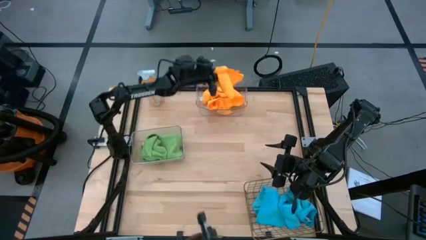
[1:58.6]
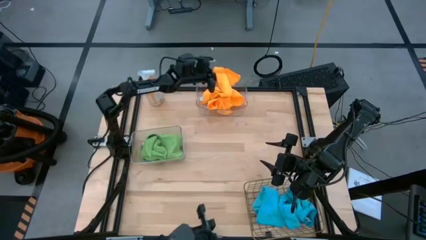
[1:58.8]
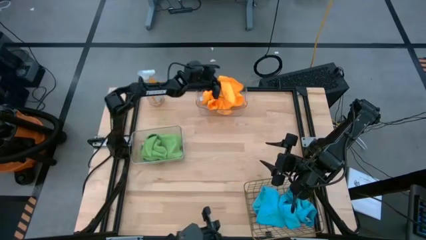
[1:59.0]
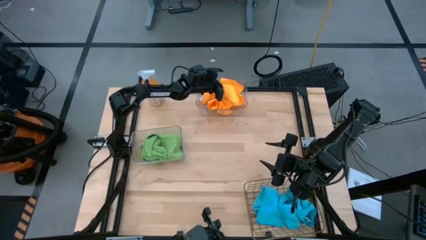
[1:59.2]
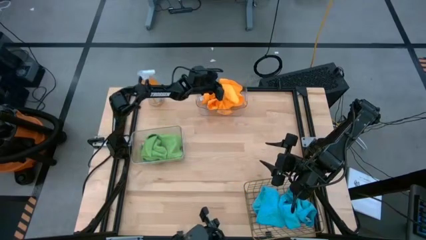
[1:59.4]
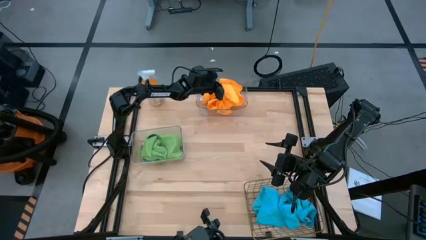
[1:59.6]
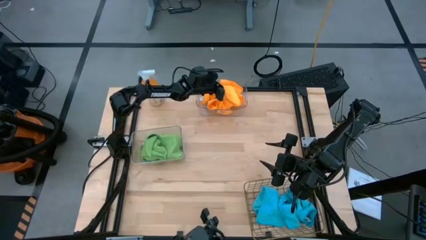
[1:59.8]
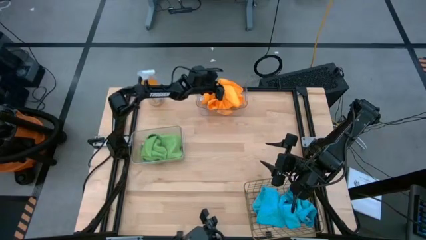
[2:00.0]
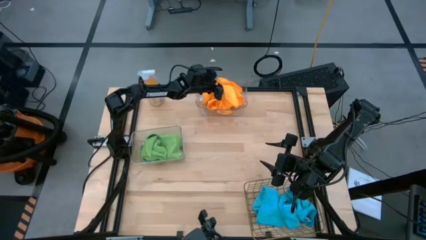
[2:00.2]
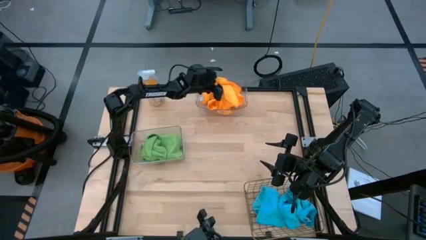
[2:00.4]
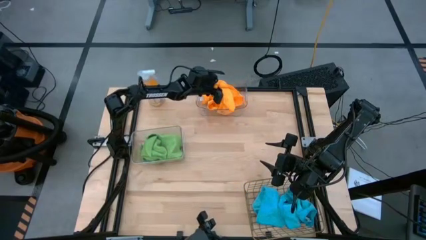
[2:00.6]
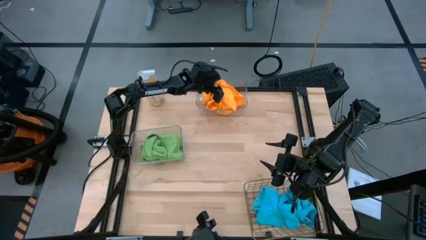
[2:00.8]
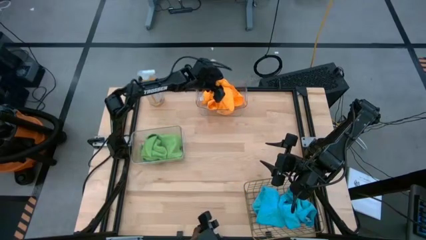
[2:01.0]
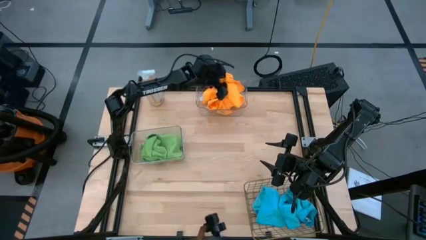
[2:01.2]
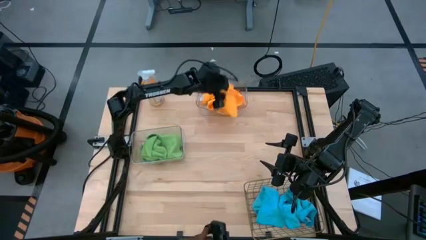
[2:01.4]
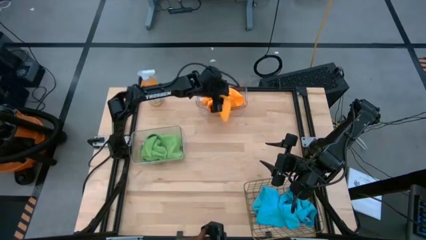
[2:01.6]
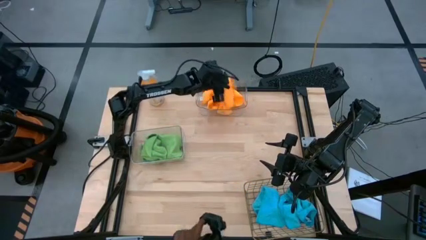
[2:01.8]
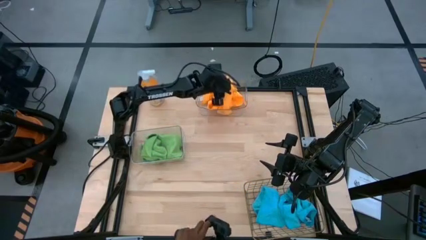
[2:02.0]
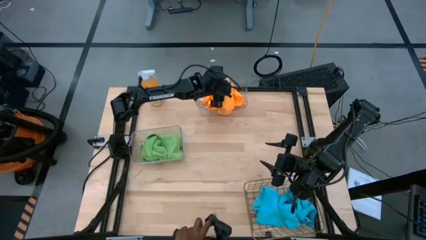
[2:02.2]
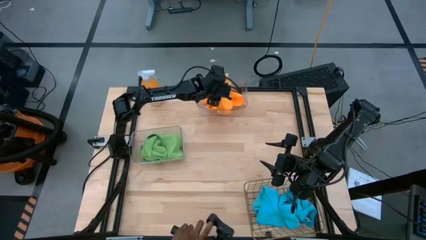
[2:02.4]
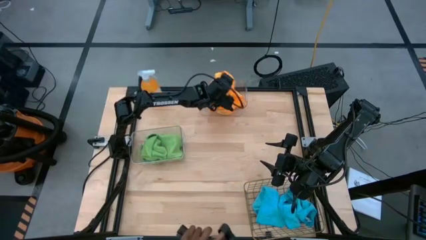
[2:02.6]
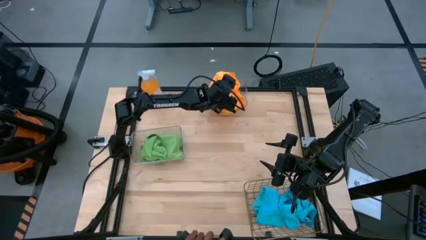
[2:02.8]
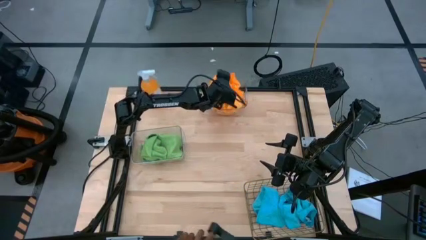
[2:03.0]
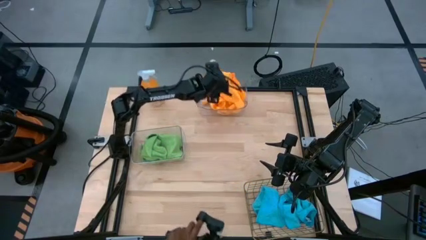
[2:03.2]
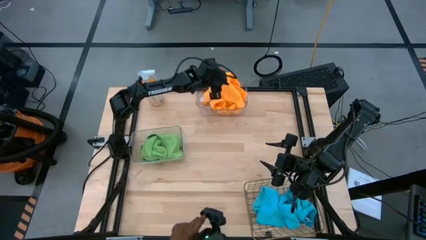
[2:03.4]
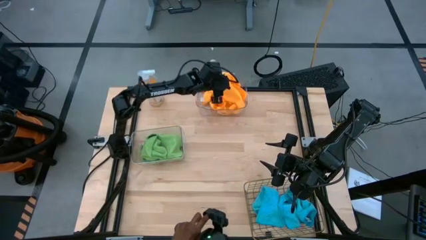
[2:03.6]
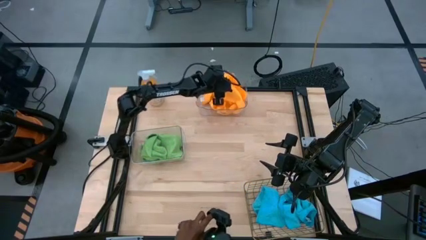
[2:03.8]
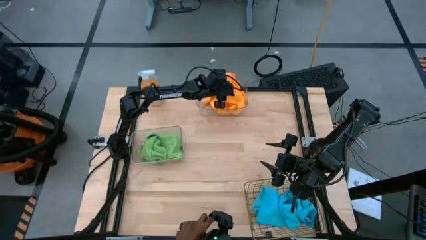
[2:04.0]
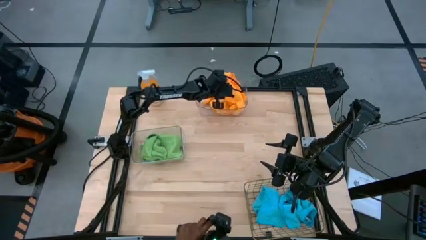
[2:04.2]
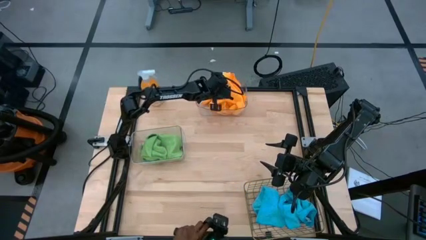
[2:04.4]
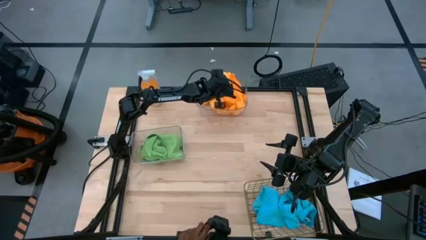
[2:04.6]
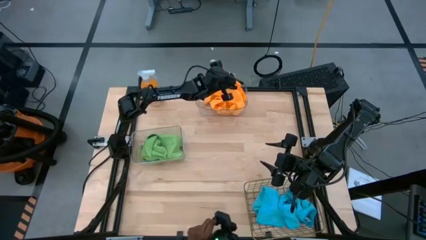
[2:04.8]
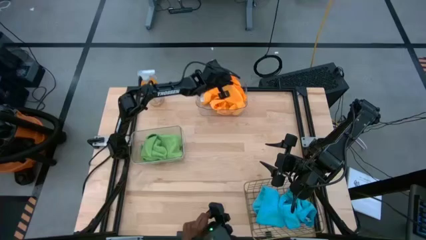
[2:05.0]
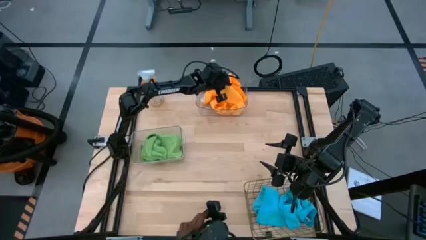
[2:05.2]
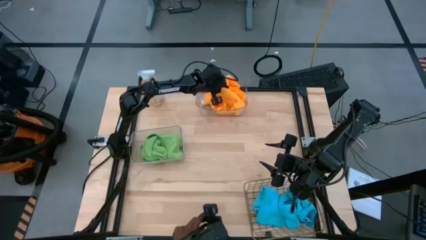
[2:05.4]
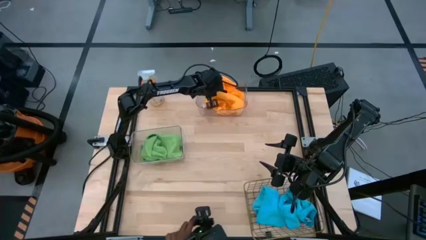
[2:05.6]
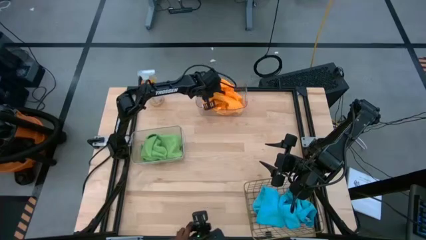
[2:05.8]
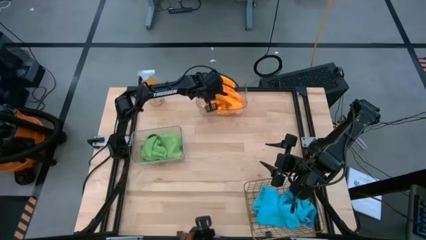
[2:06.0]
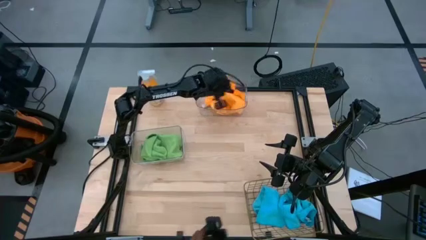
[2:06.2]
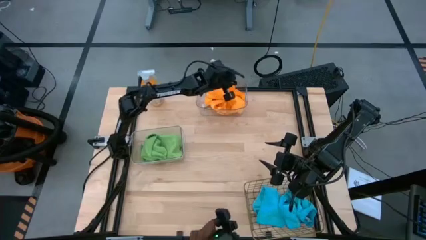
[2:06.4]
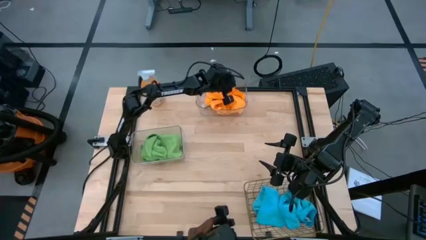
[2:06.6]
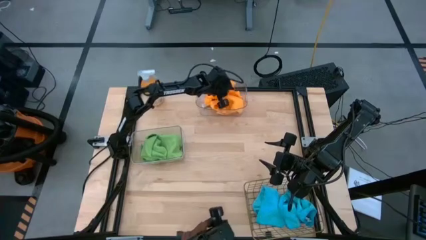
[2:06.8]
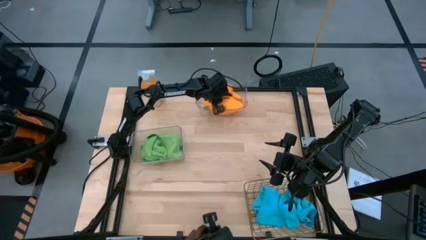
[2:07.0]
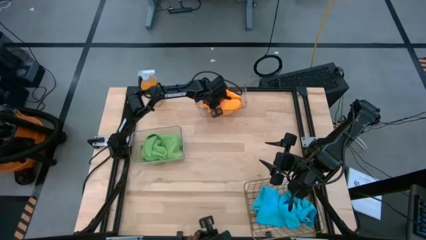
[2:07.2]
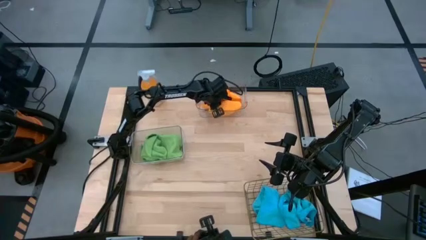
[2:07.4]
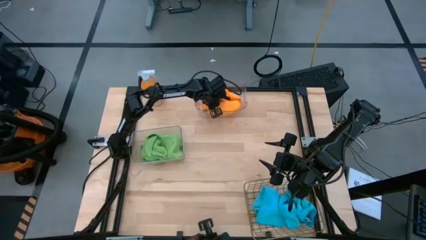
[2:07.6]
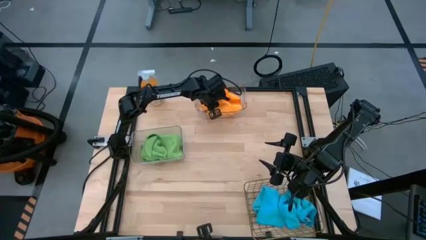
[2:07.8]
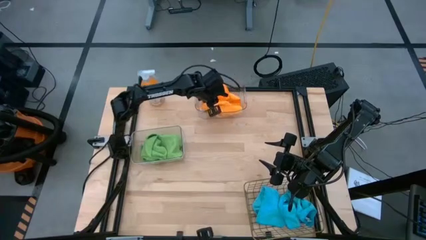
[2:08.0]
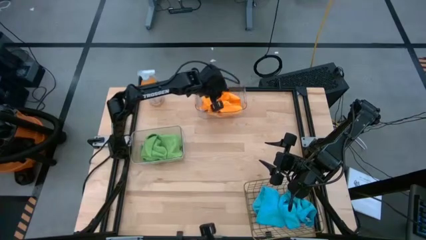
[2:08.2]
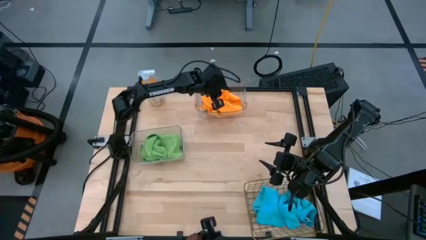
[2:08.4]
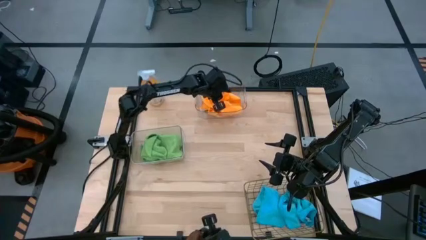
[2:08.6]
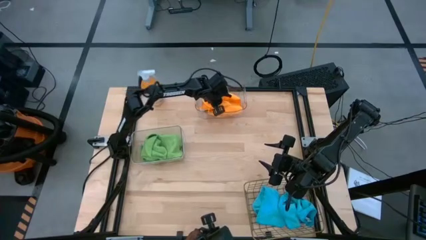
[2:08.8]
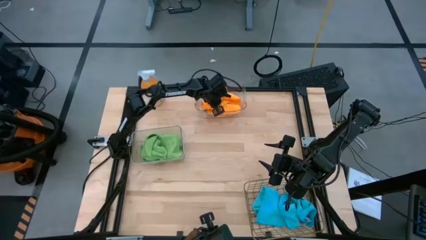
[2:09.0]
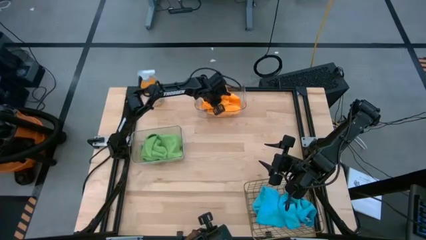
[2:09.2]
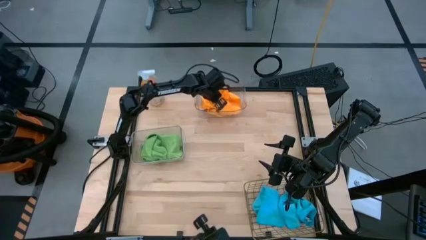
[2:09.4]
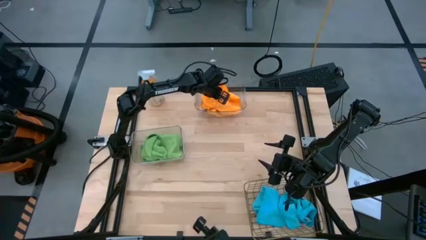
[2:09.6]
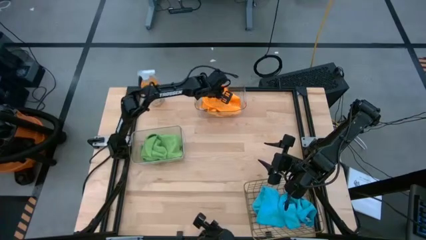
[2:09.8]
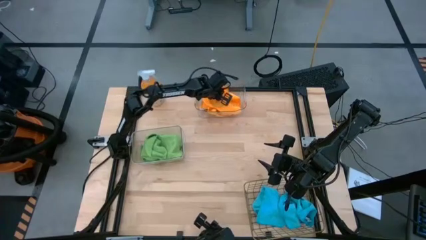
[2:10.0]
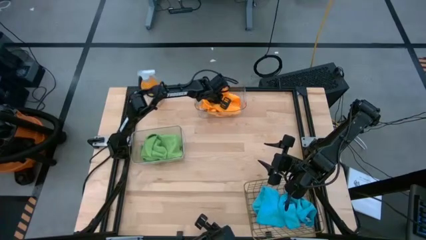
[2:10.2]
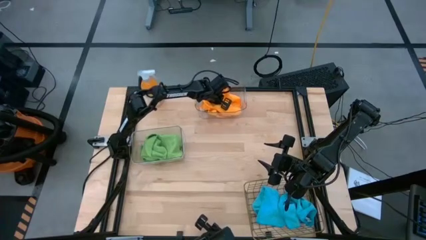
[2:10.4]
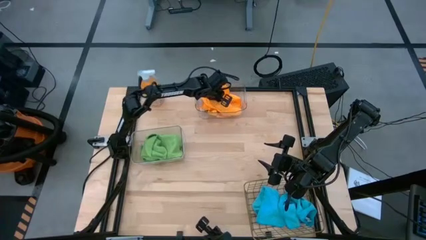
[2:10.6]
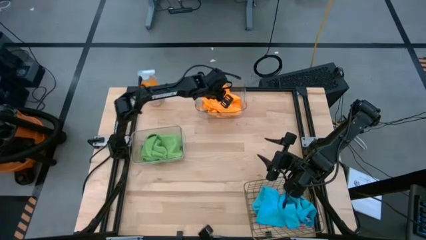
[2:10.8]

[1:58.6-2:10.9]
Task: Sort microfiber towel by color & place in baskets
Put the orange microfiber towel into the top transparent bin

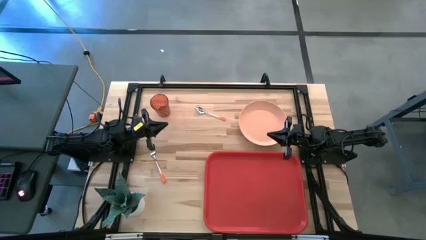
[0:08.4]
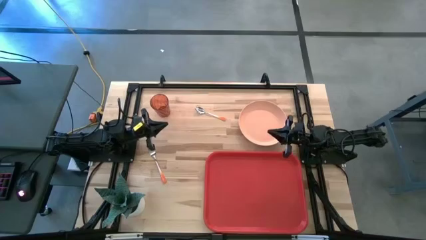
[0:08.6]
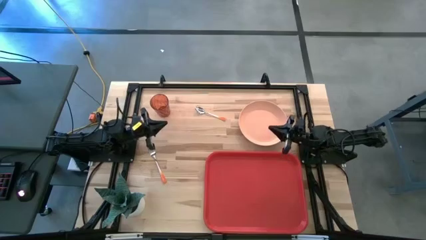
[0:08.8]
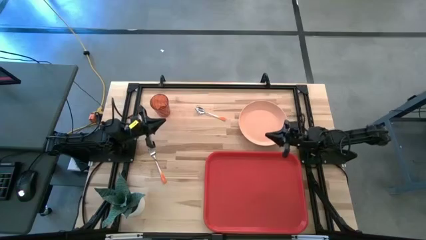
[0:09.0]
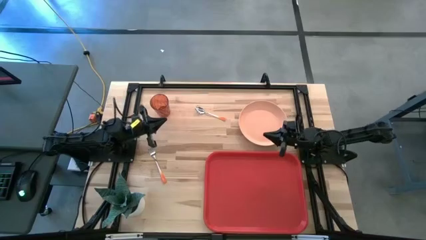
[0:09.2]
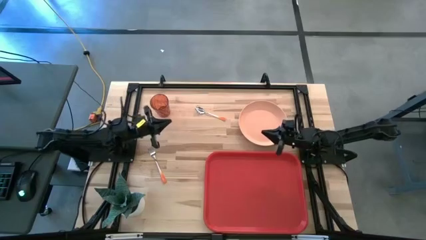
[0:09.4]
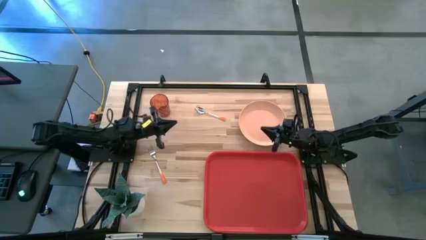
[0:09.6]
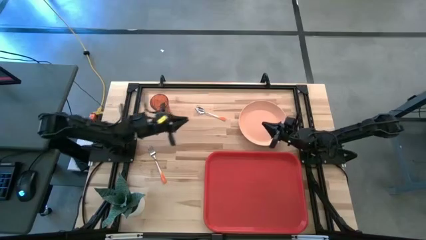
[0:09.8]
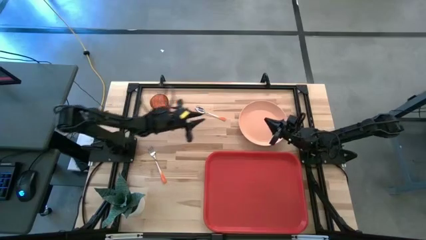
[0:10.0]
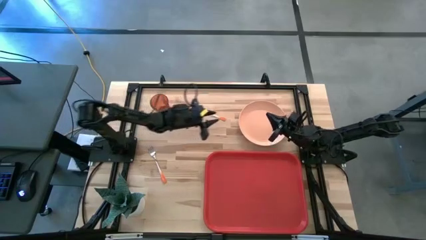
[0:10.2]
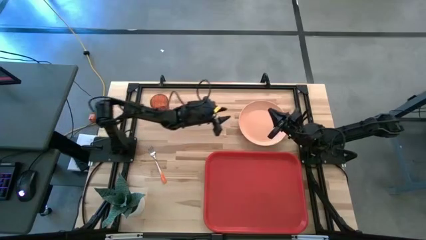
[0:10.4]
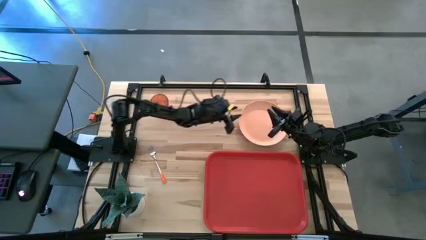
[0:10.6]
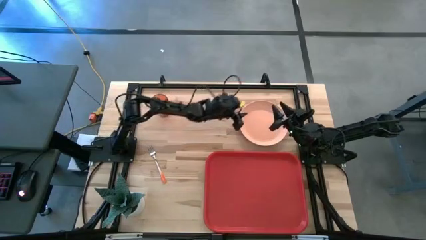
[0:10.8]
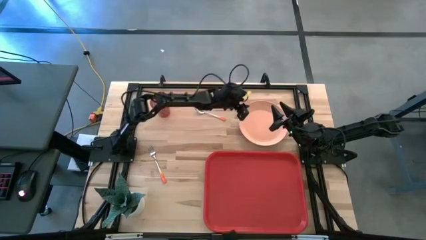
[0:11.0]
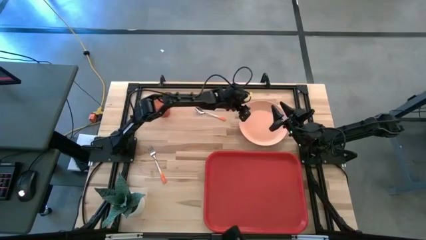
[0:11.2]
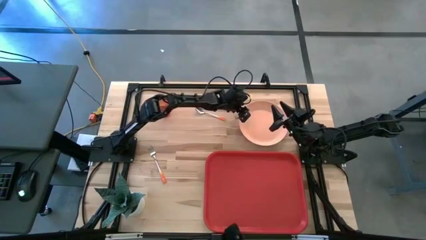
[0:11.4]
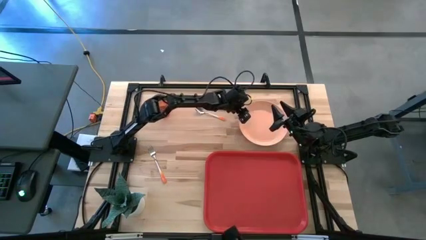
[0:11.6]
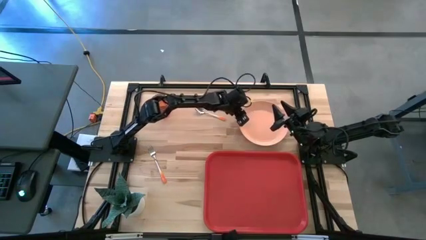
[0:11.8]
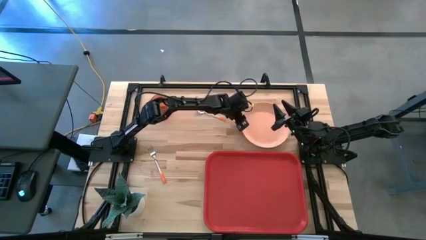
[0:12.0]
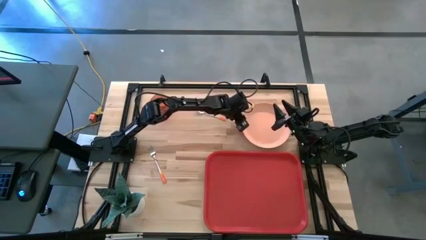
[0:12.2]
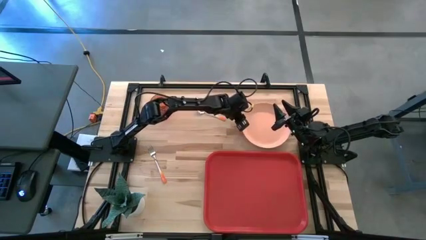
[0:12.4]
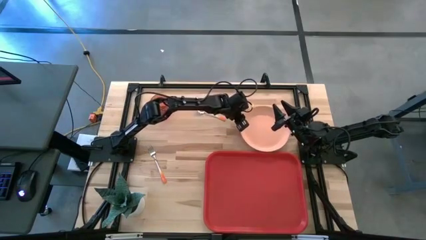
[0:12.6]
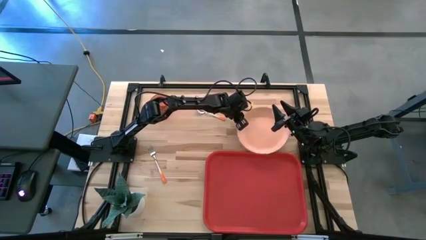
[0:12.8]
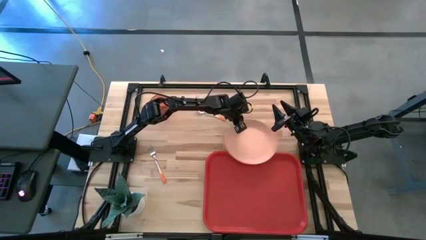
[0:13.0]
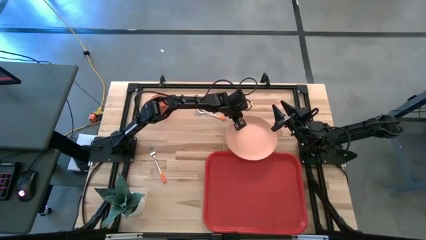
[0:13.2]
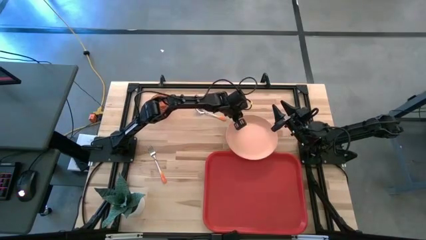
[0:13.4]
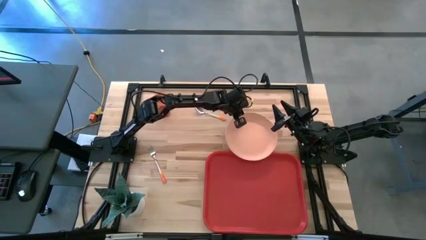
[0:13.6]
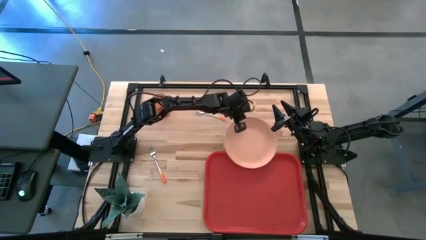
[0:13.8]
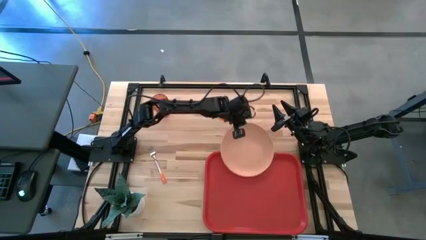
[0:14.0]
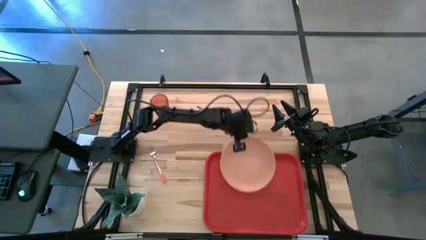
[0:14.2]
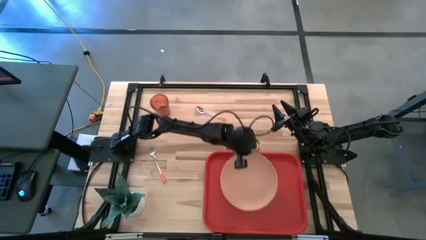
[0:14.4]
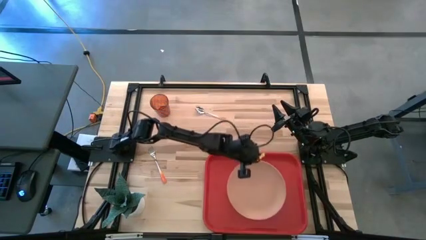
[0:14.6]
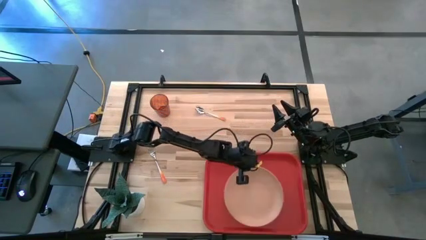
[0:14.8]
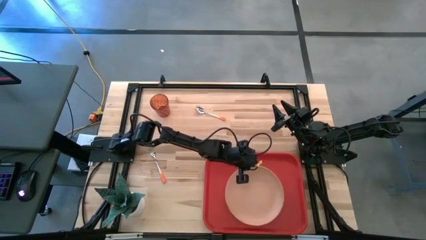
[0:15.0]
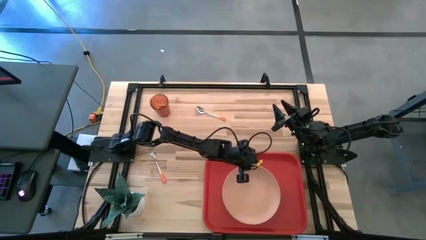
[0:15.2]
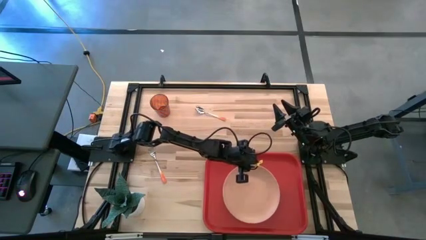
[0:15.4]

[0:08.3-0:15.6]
Task: Pick and place plate/cup/fork/spoon on tray
Put the orange plate on the red tray
